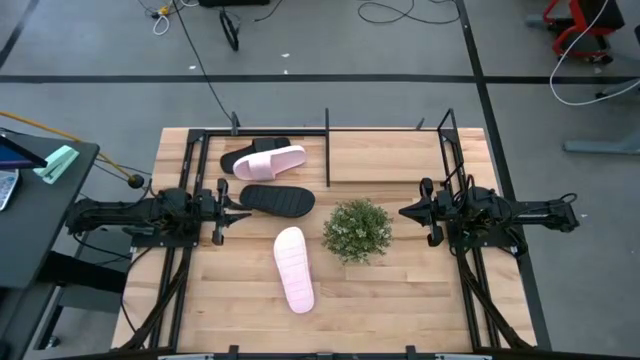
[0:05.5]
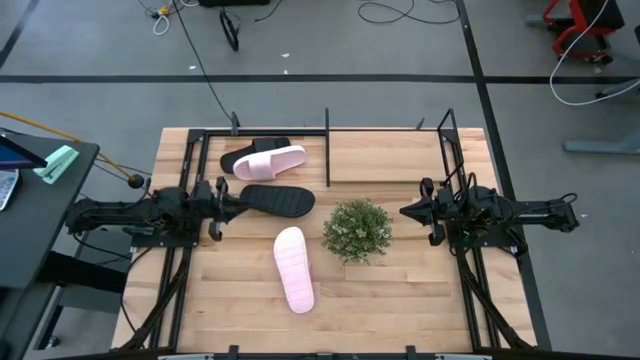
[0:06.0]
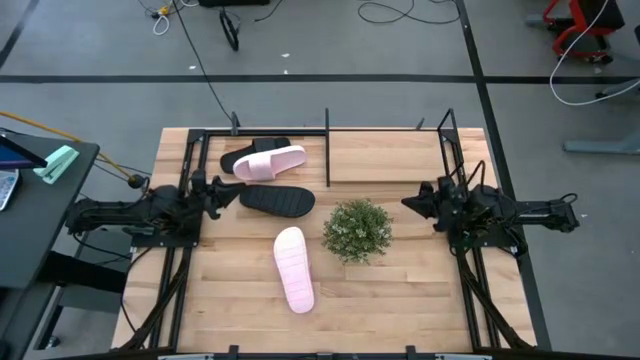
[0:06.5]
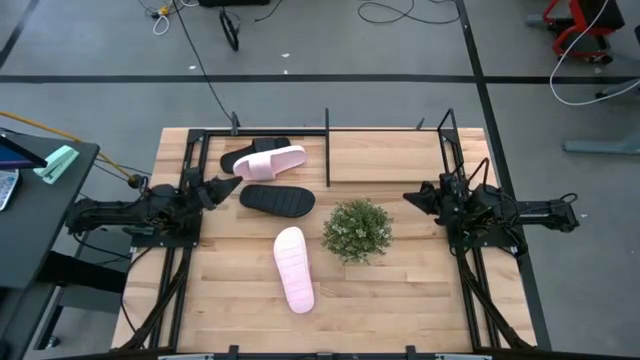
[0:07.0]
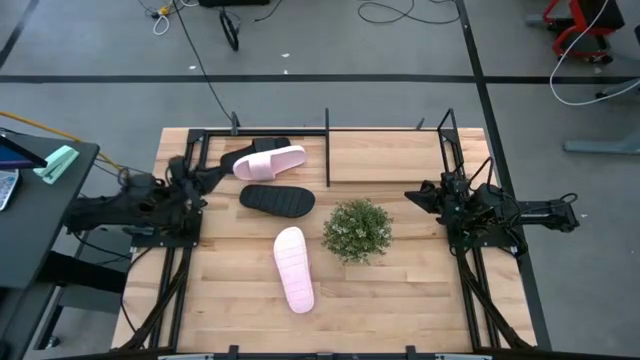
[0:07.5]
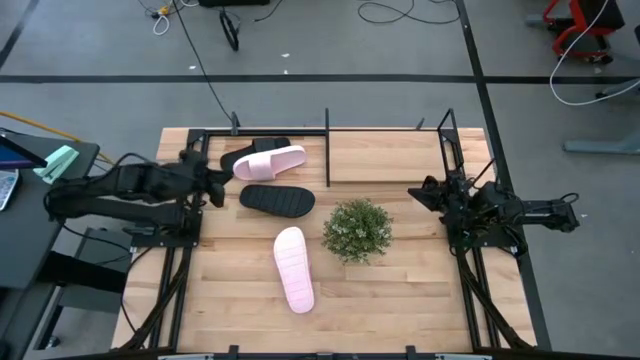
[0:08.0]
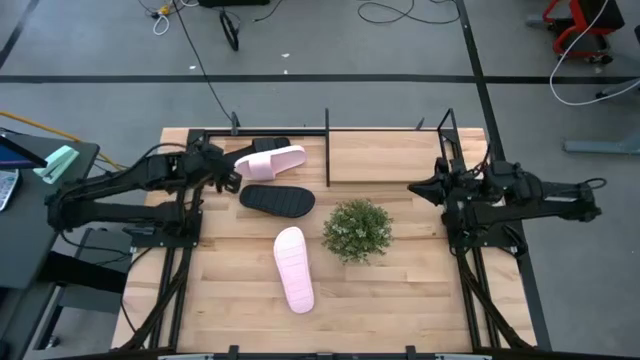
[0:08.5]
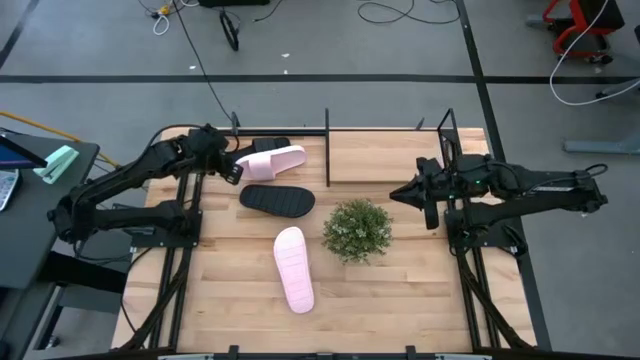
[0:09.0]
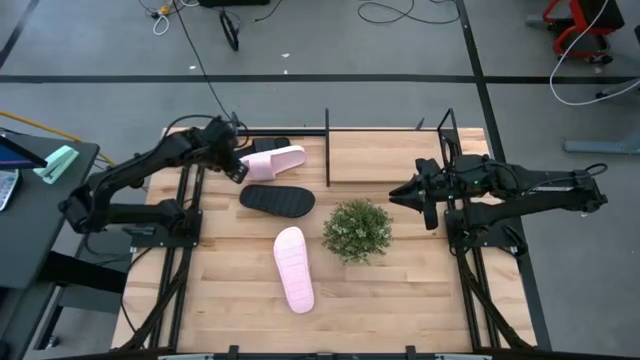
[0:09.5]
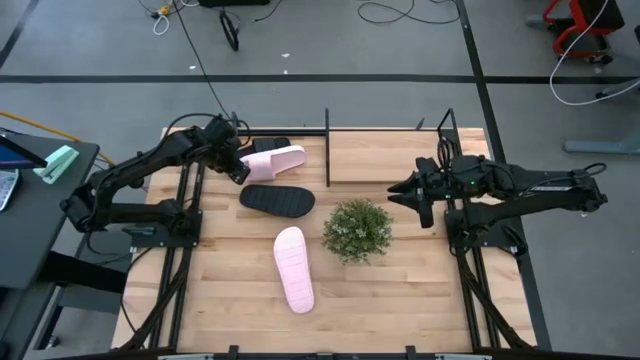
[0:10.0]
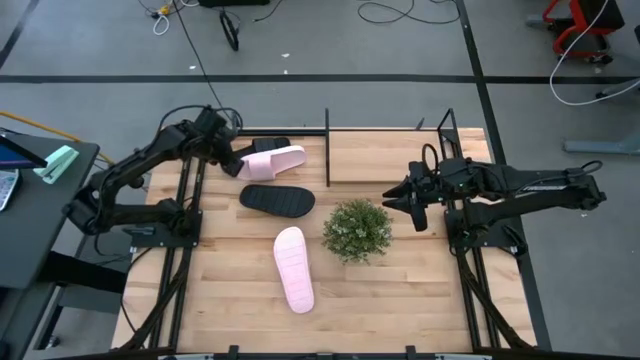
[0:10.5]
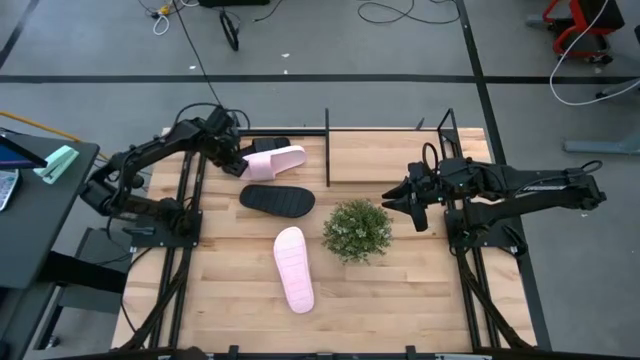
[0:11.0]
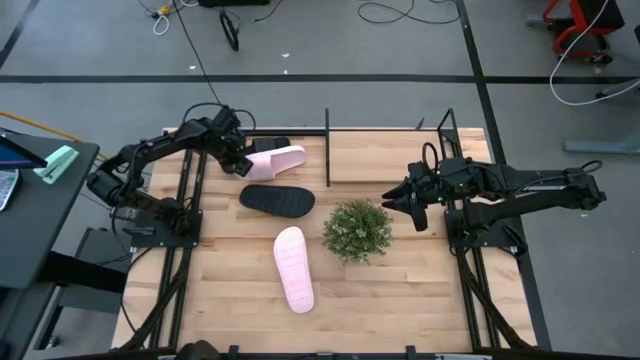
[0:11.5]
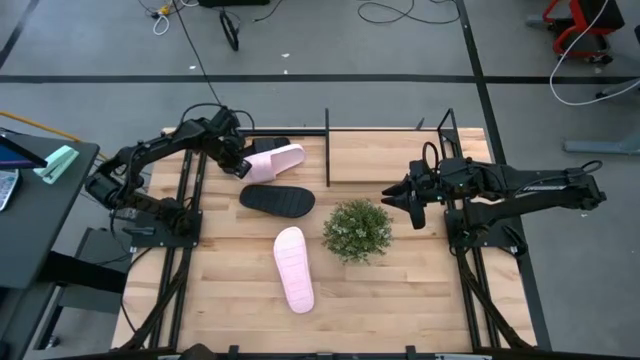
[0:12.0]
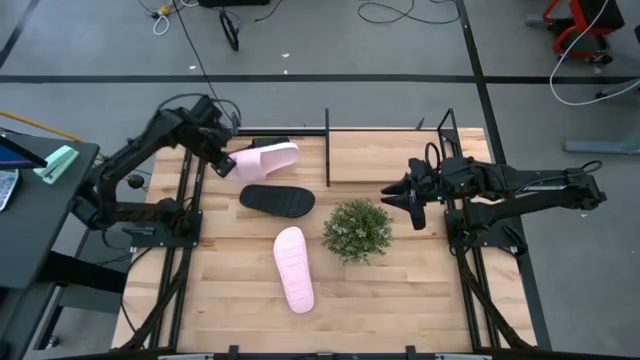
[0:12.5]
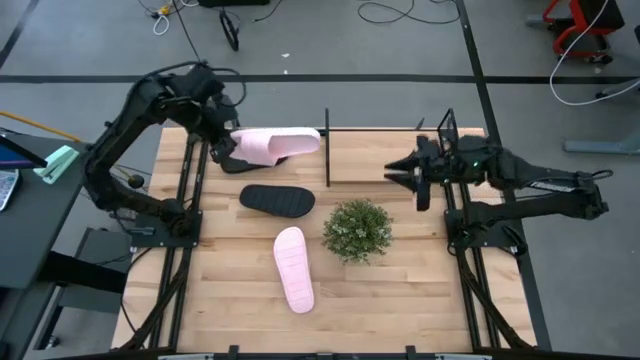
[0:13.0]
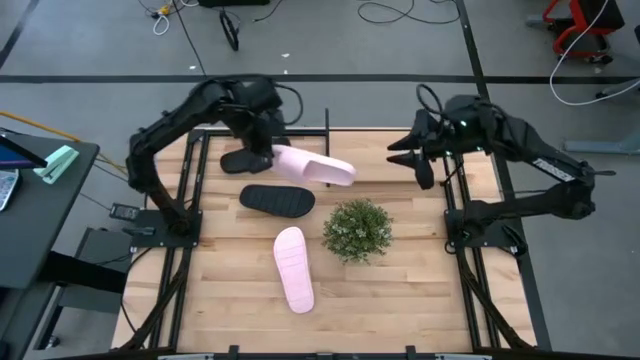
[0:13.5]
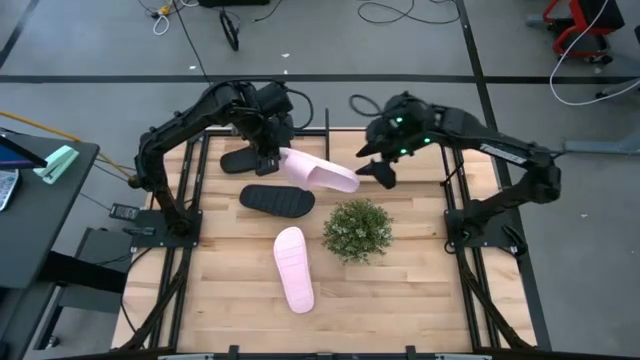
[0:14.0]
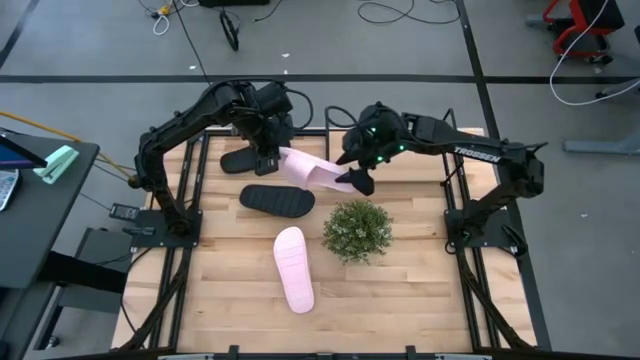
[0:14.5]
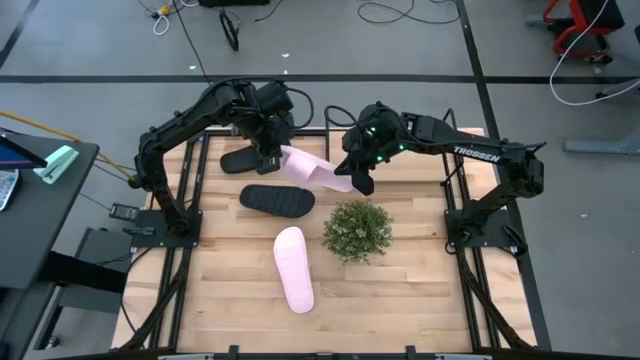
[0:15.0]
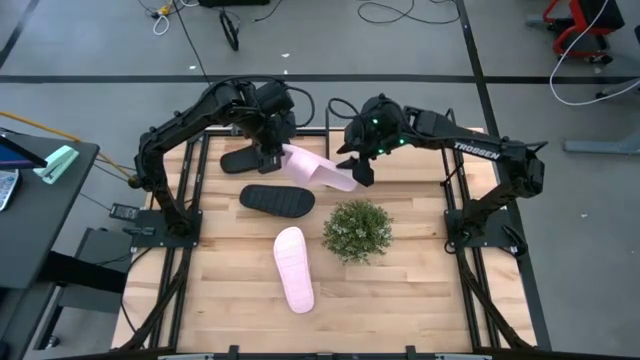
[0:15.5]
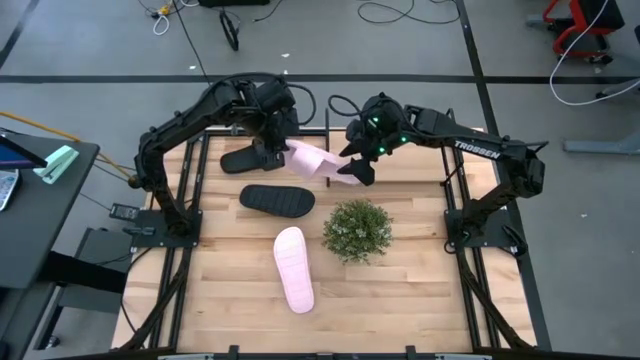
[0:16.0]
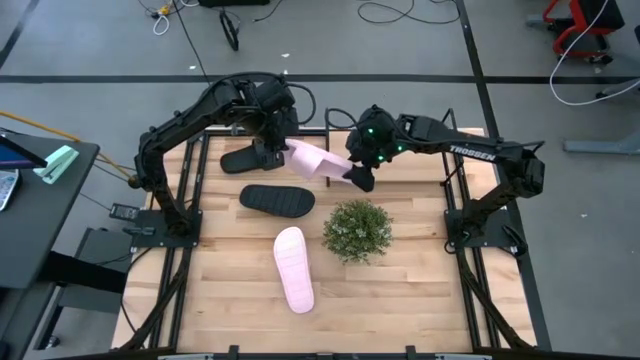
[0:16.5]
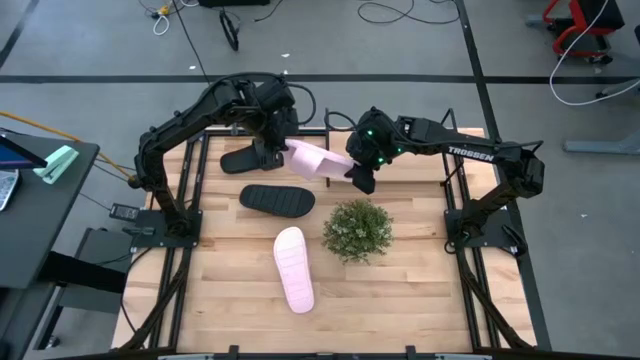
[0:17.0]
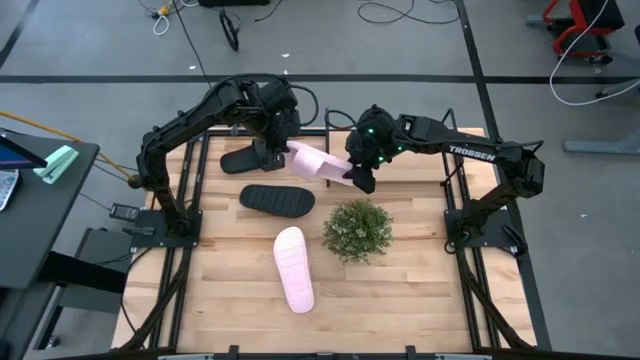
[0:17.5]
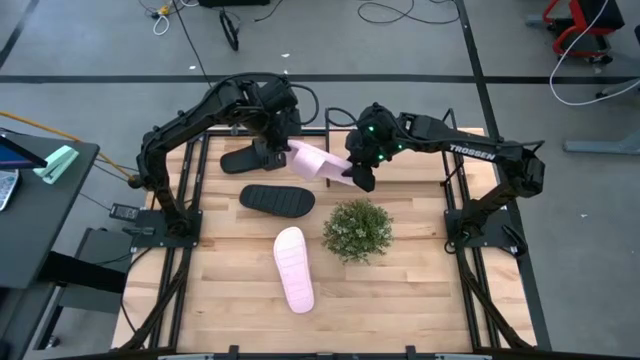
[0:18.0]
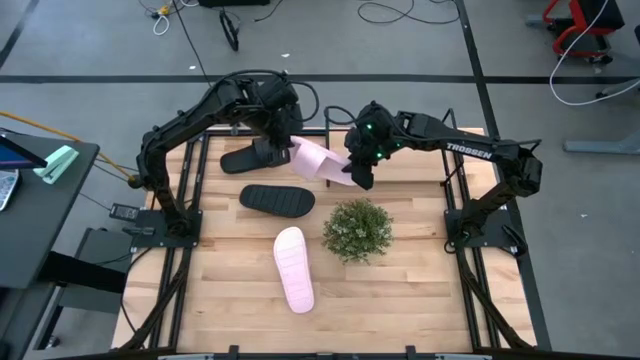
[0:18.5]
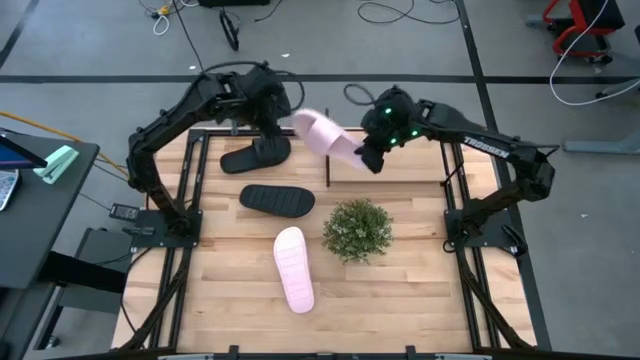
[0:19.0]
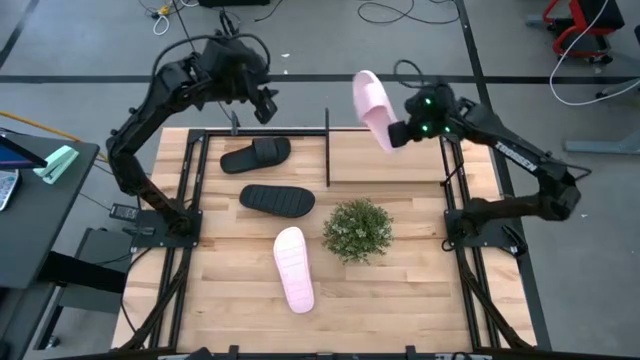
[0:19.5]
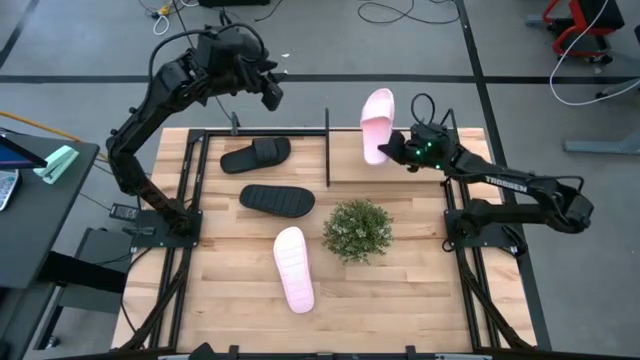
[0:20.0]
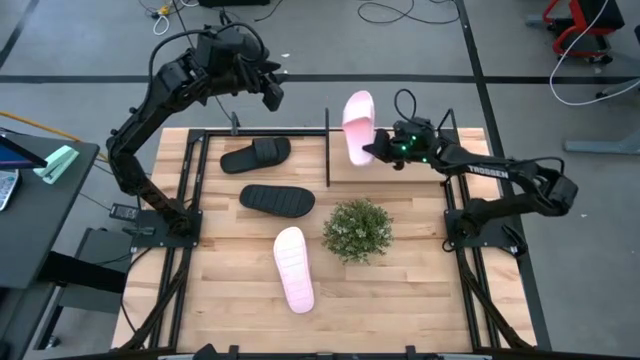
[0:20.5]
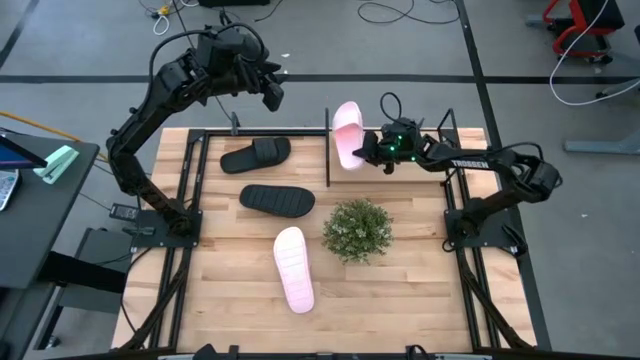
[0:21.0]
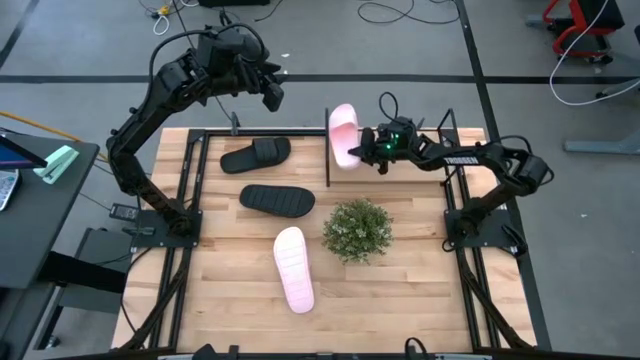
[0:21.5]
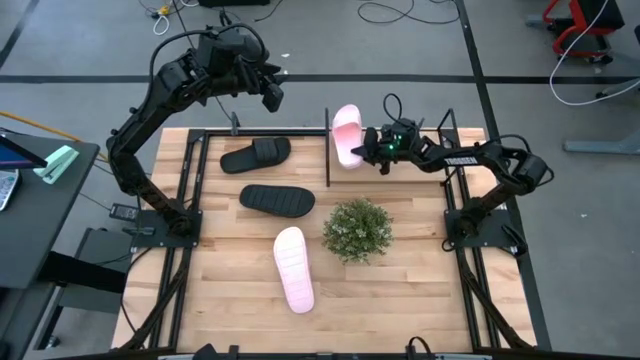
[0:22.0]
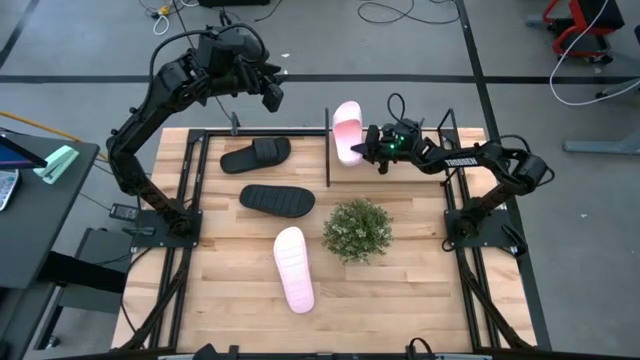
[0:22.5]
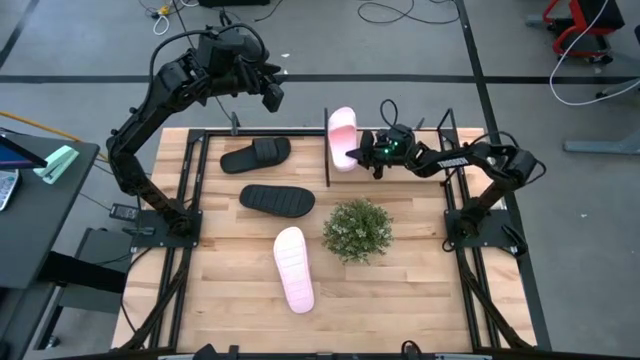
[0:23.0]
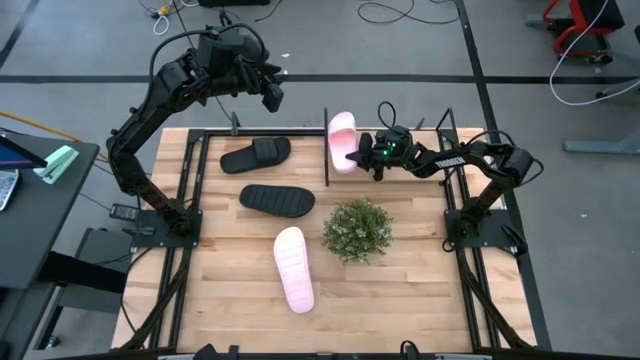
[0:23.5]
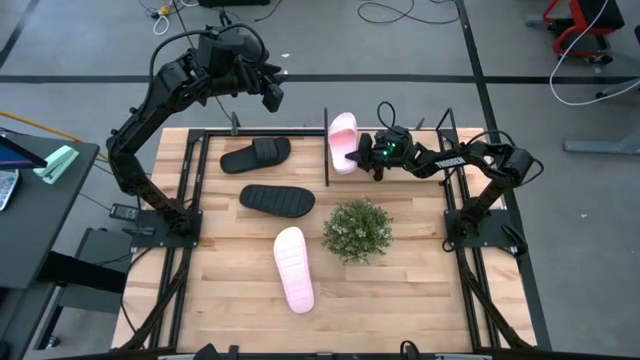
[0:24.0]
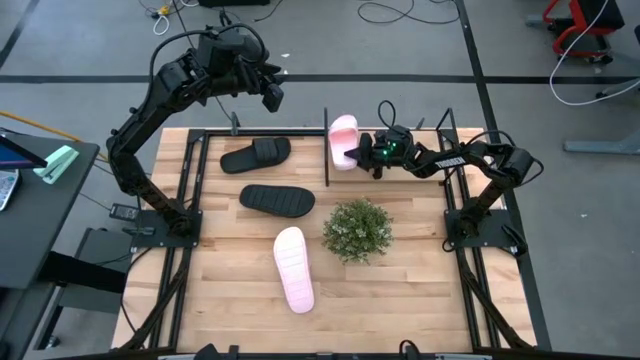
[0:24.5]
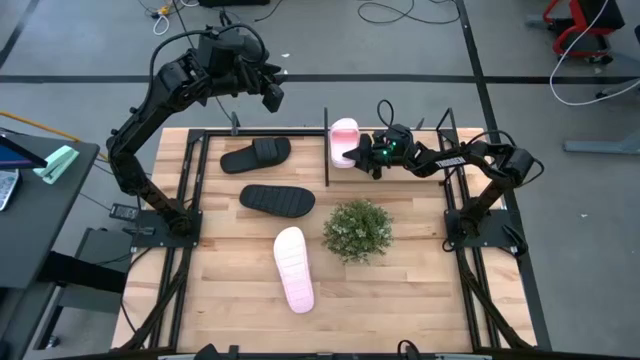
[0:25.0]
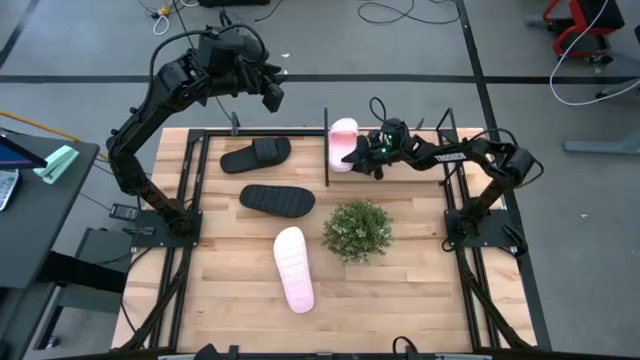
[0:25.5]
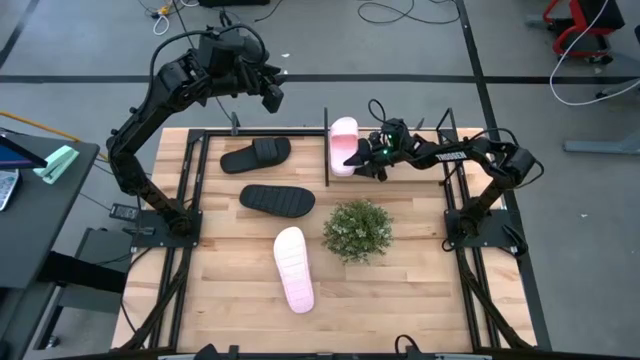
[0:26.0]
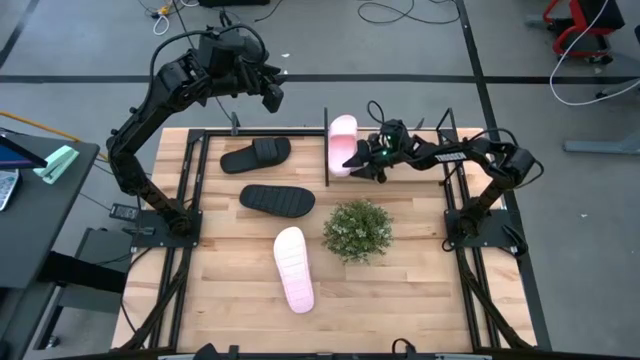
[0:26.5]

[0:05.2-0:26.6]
Task: Pick and place slides into the shelf
Put the top pink slide on the shelf
